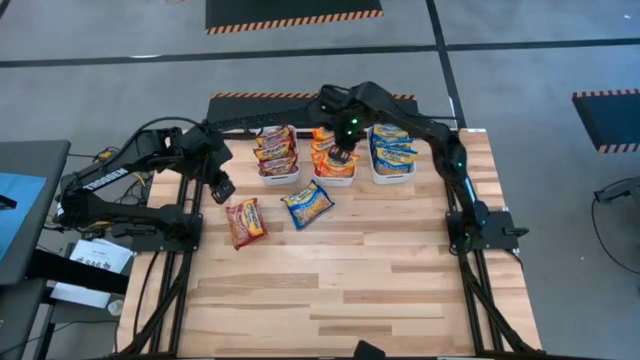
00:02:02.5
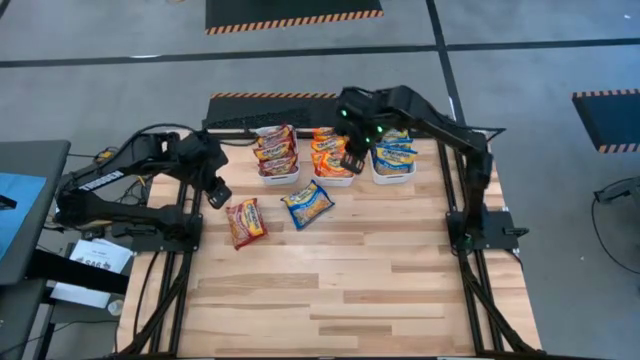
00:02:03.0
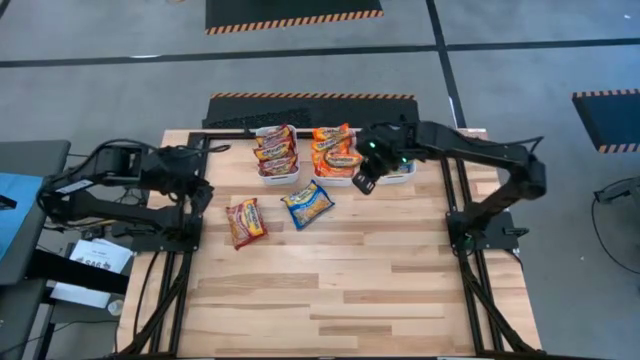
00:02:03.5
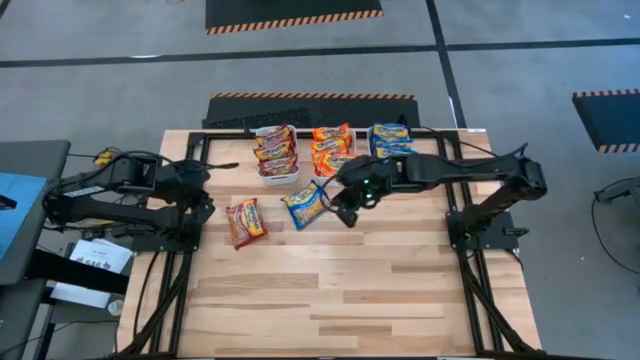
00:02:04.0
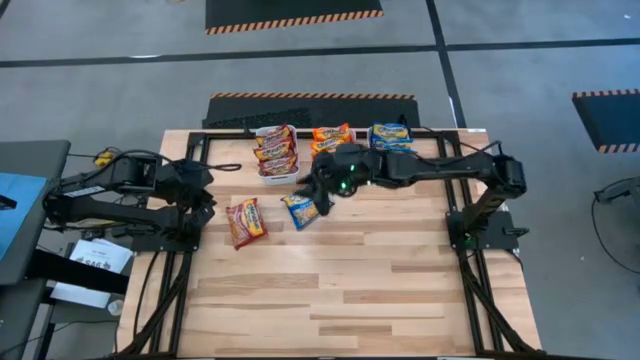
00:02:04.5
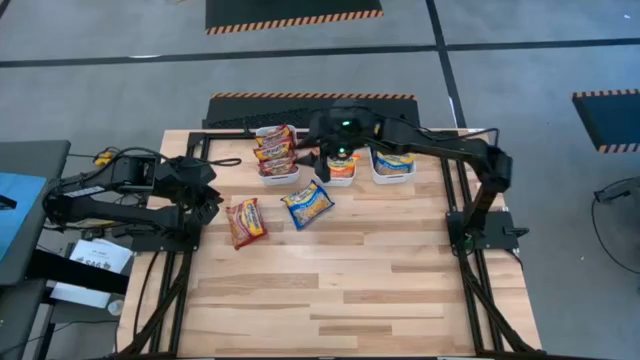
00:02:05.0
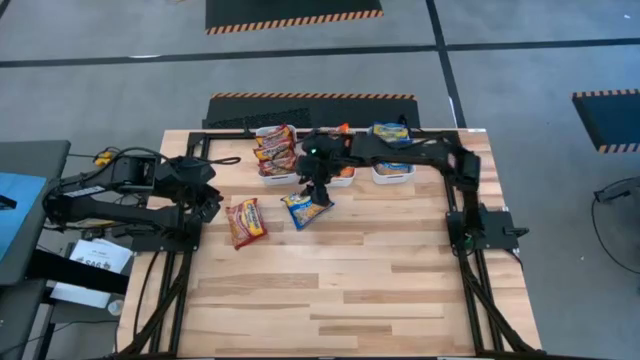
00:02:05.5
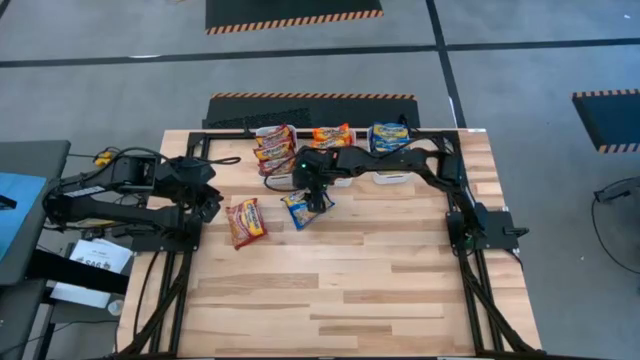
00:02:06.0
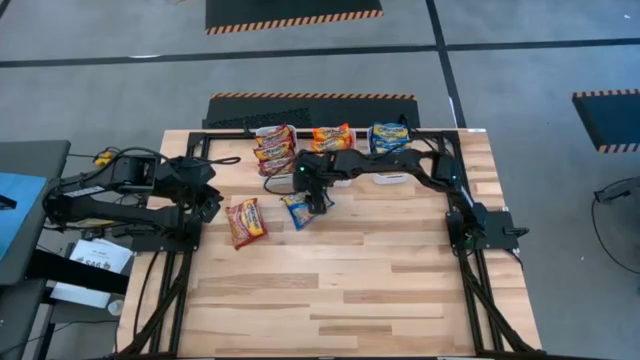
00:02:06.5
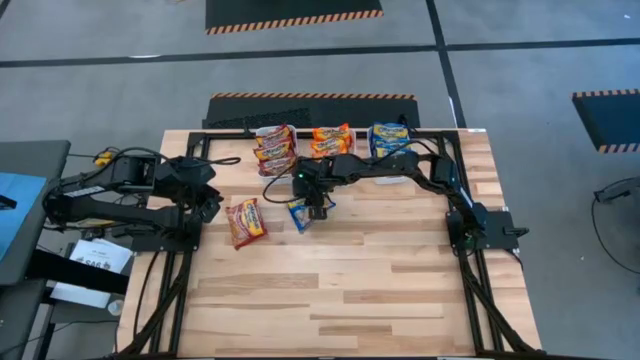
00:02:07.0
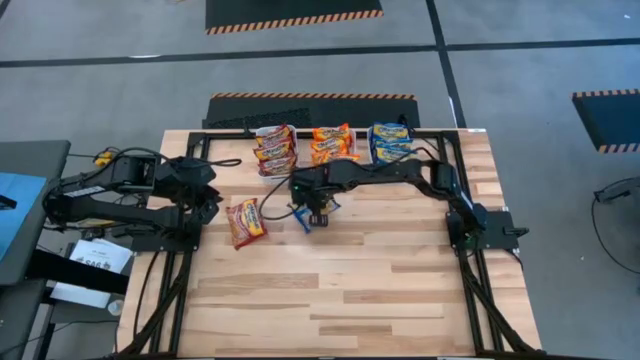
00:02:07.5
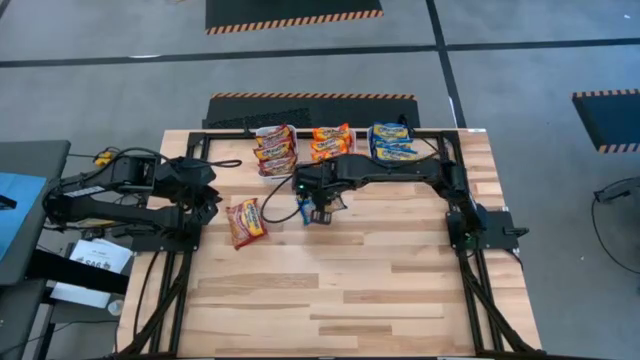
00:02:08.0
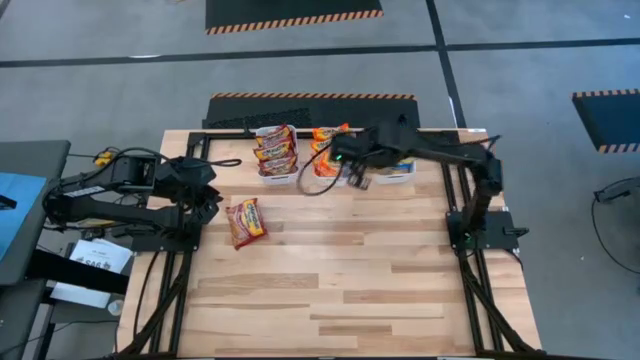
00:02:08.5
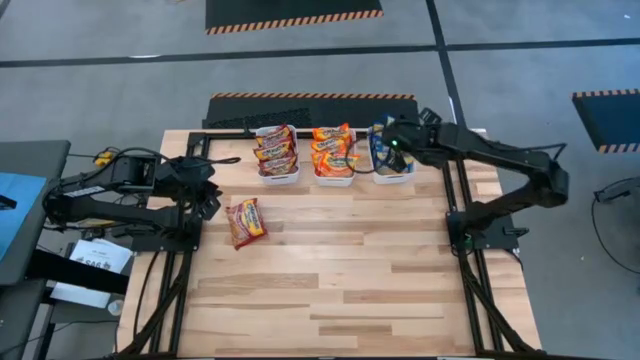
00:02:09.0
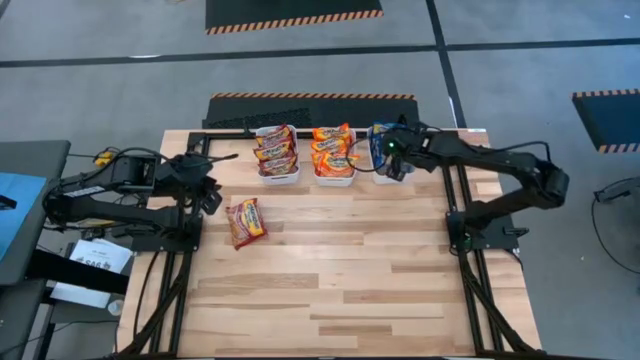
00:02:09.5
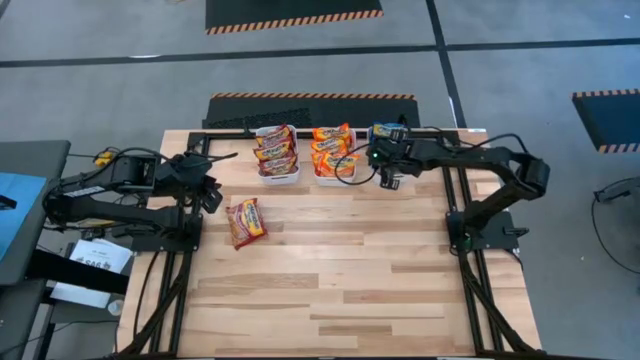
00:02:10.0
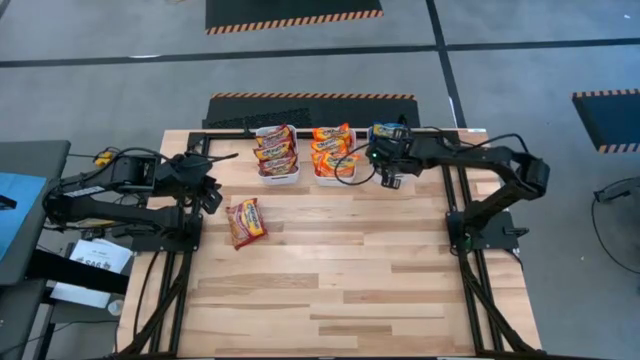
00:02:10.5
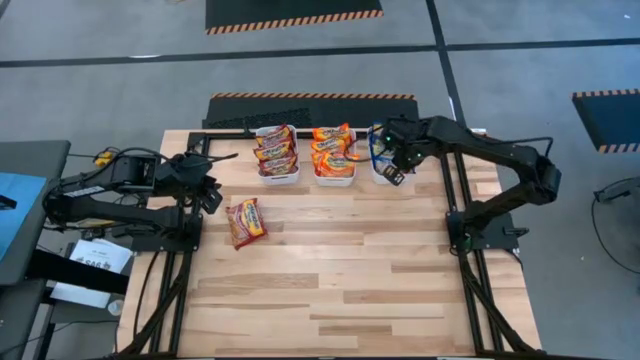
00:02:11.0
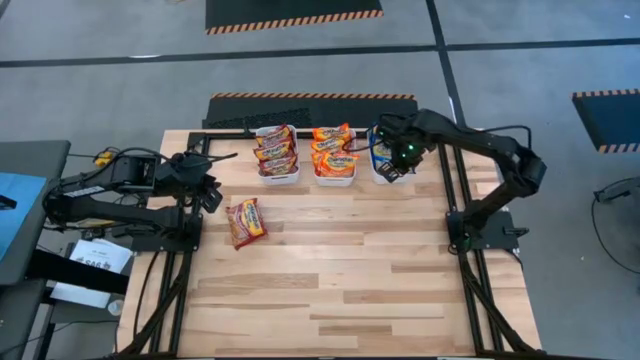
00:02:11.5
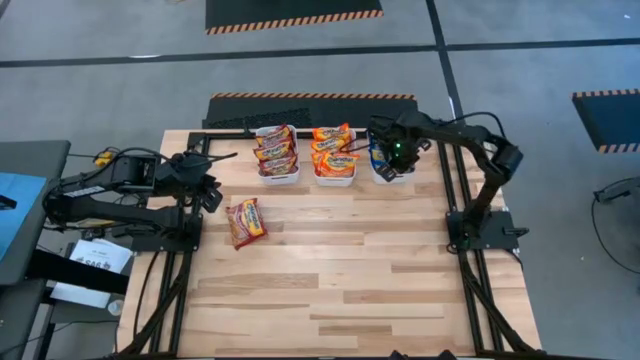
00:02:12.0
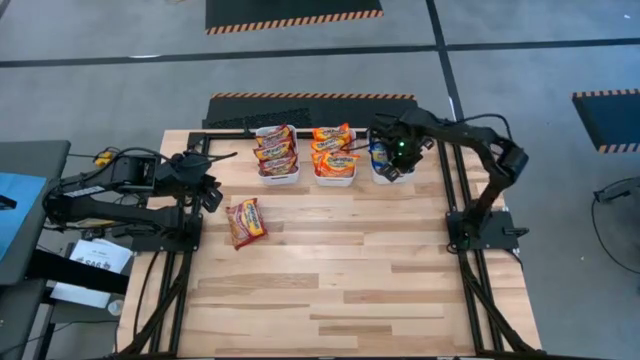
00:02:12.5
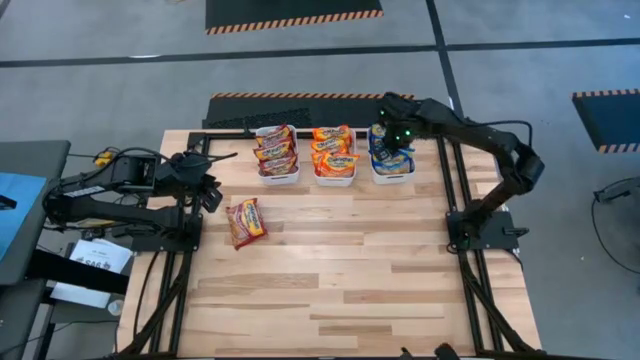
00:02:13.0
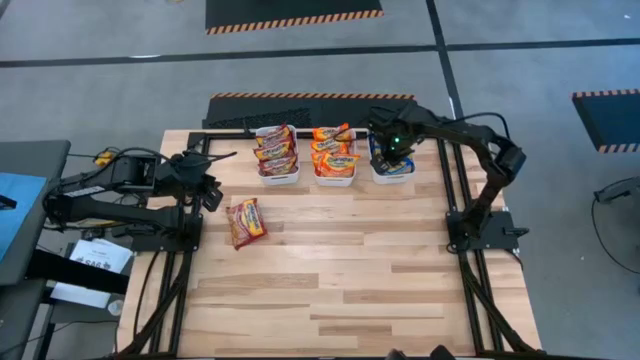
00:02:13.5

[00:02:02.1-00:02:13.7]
Task: Sort Maruchan noodles
Put the blue noodle pack into the right white bin

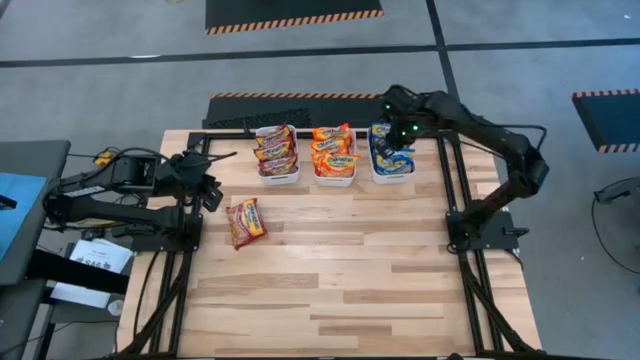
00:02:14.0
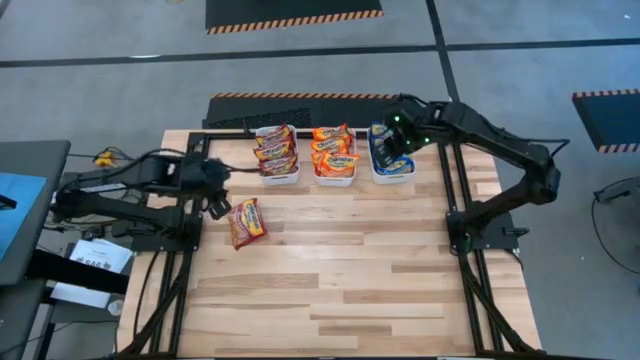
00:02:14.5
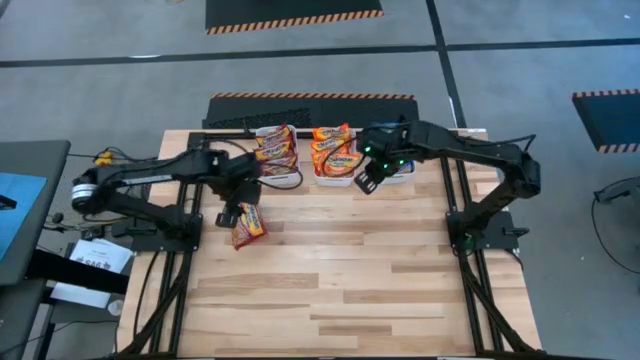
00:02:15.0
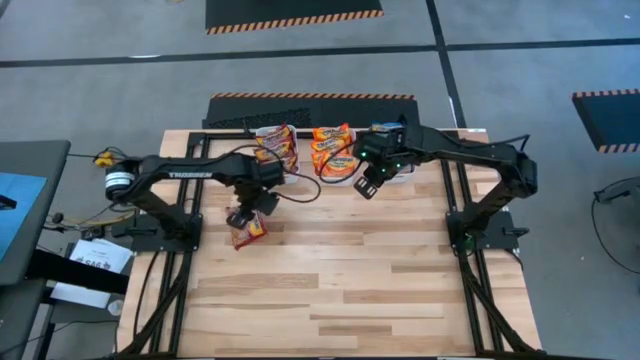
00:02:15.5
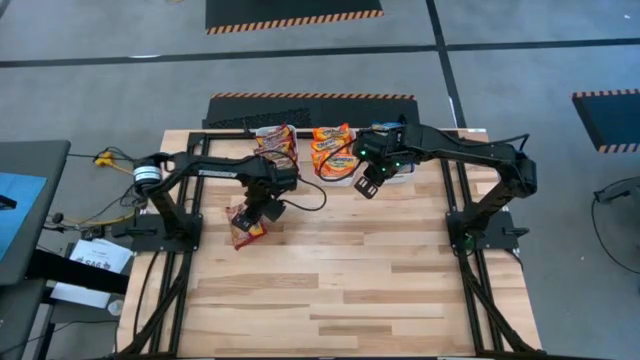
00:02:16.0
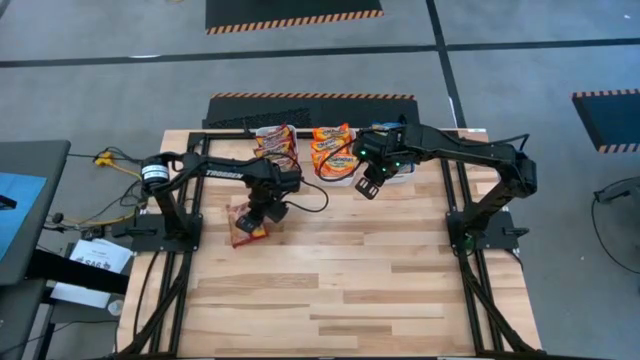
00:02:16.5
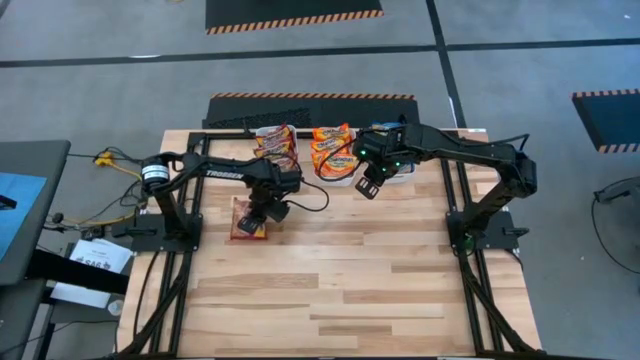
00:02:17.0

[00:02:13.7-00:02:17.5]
Put the red noodle pack into the left white bin

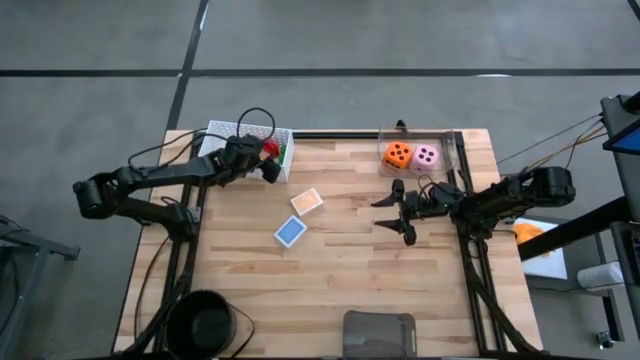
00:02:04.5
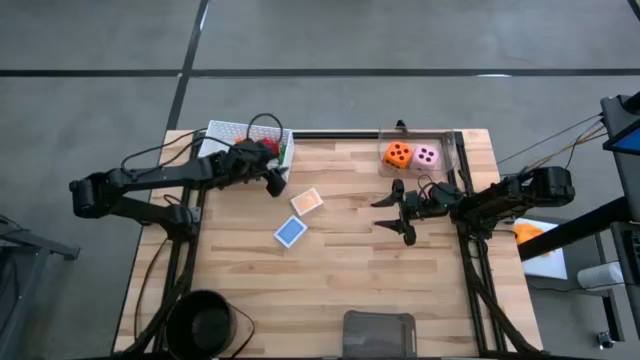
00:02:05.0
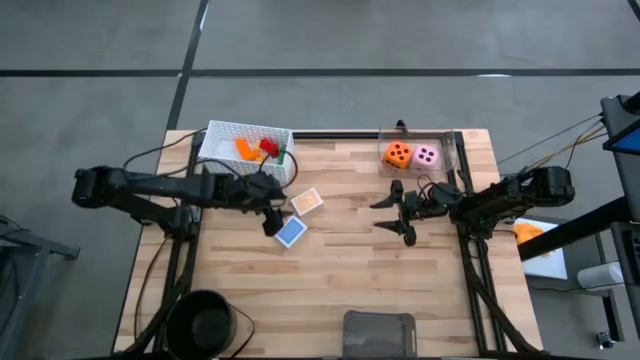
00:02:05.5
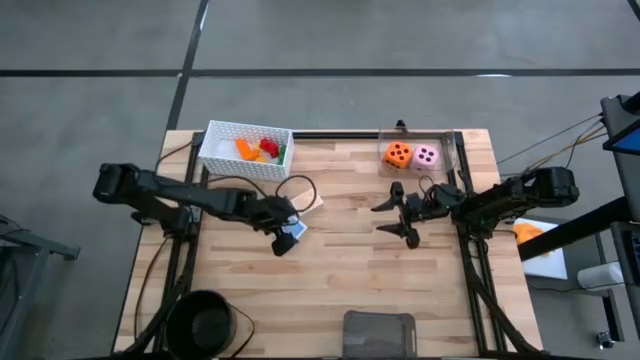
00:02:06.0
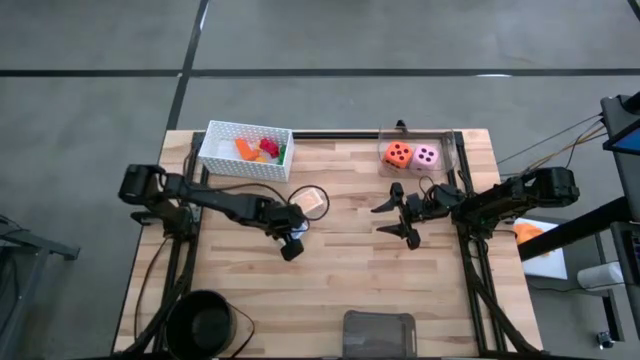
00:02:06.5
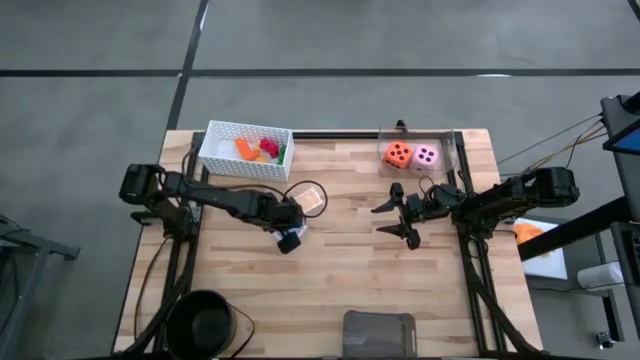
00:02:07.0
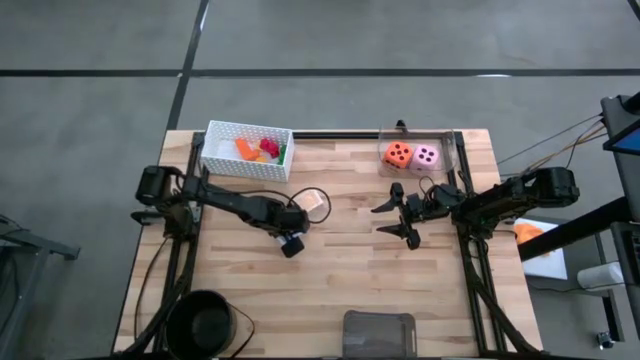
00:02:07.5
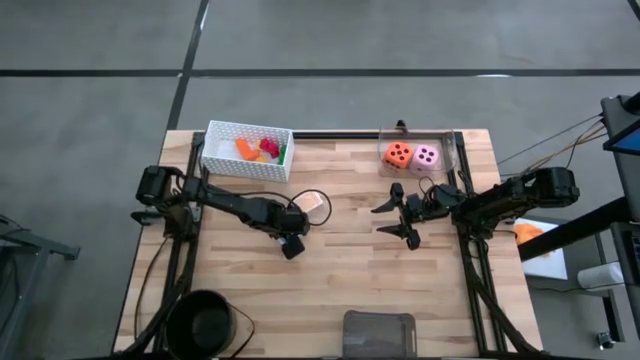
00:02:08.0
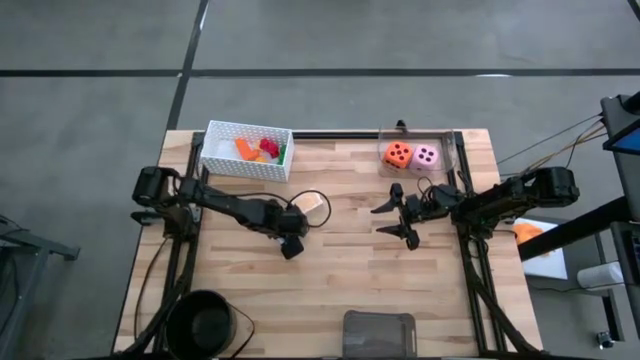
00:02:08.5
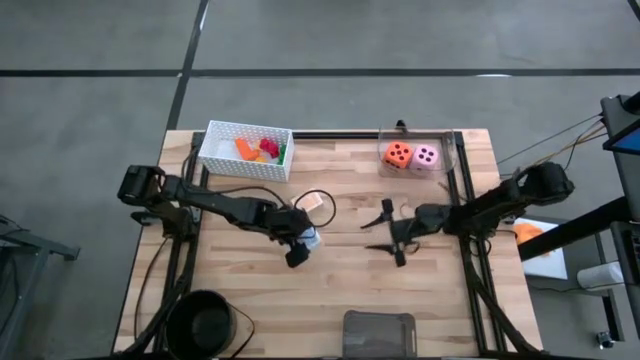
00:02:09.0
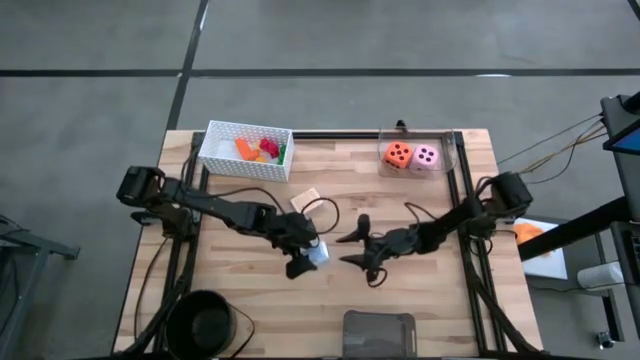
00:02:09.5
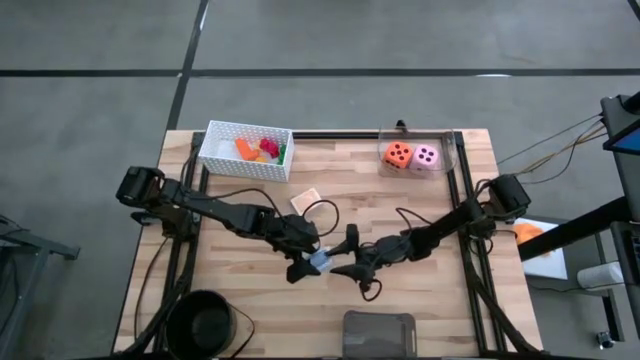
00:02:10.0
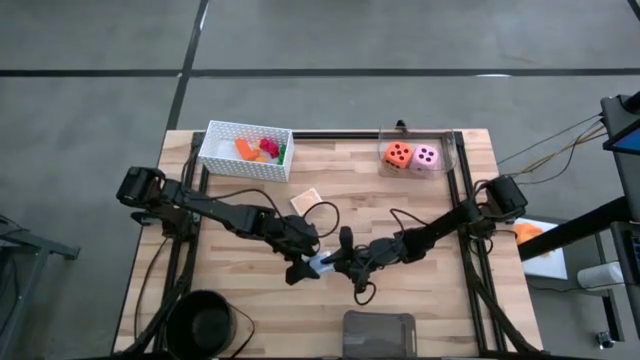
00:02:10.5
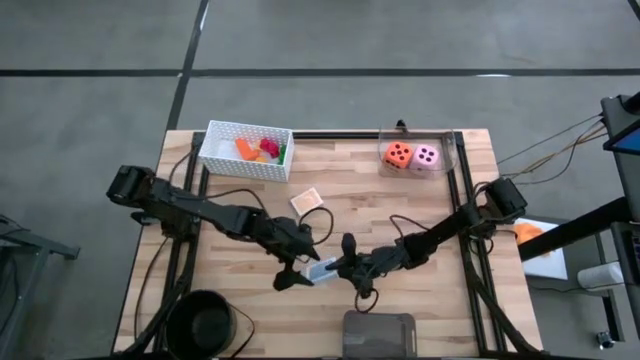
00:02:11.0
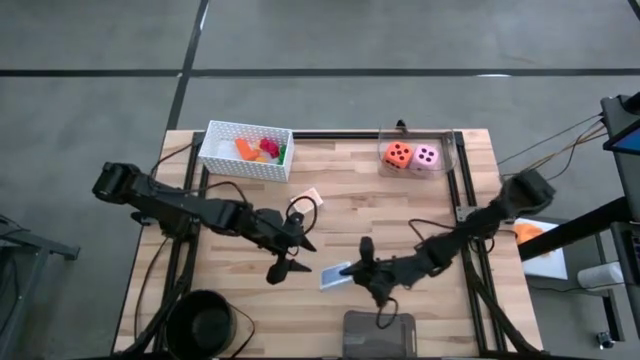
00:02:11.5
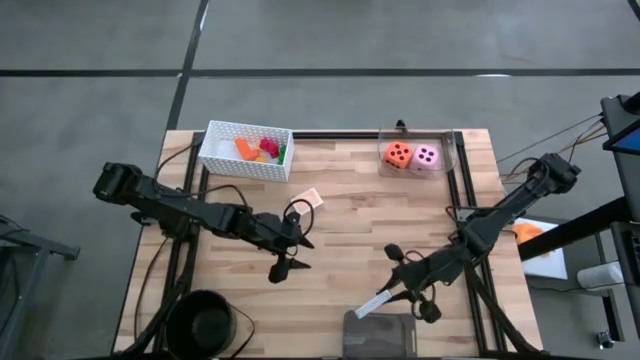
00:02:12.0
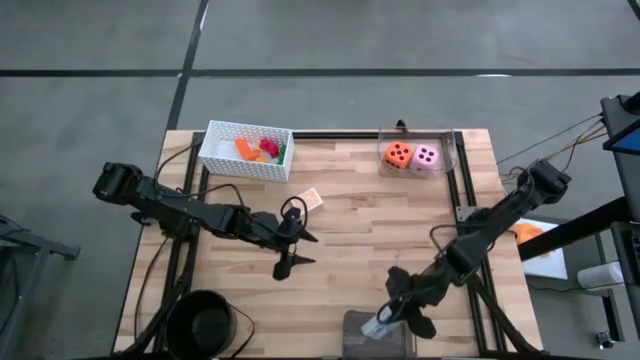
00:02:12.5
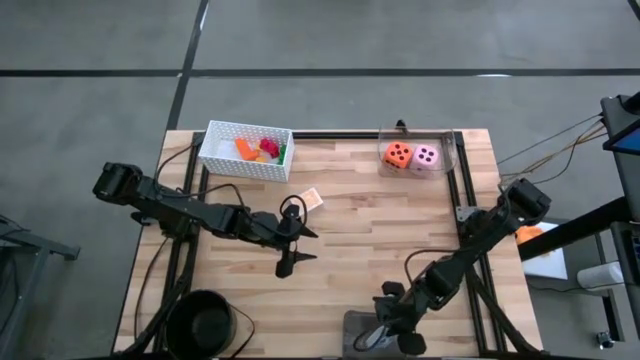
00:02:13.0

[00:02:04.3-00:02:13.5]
Task: Pick & Place Toys
Put the blue game card into the gray bin
